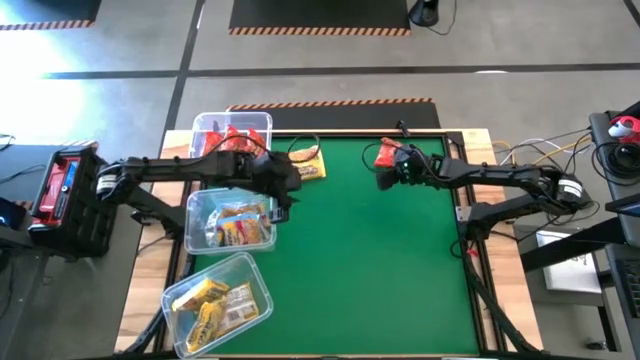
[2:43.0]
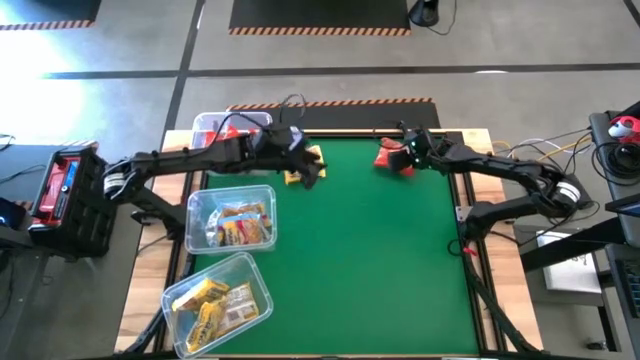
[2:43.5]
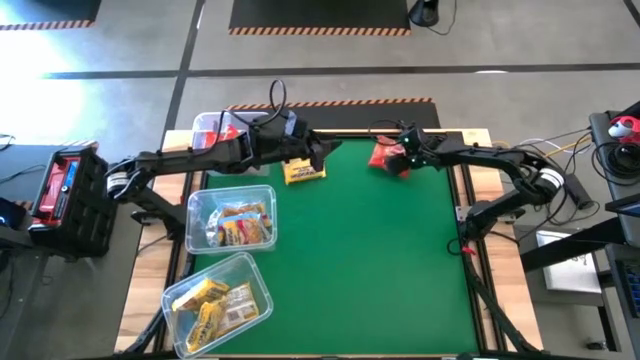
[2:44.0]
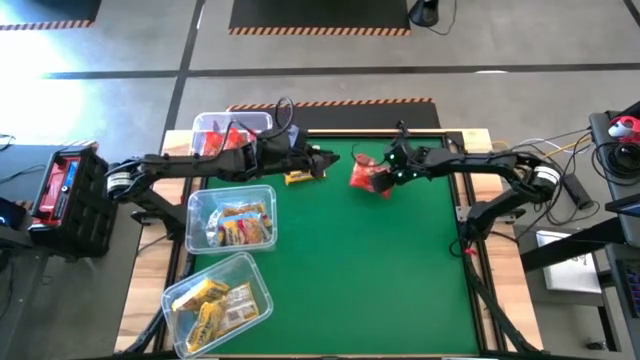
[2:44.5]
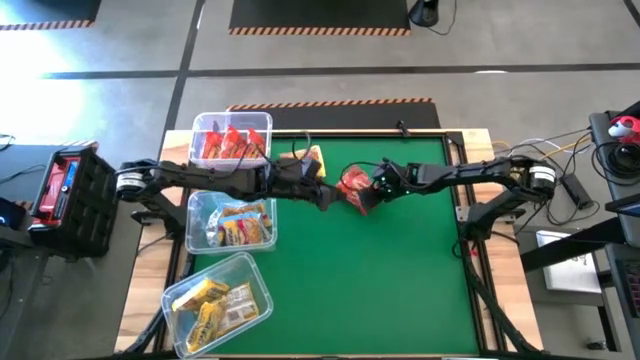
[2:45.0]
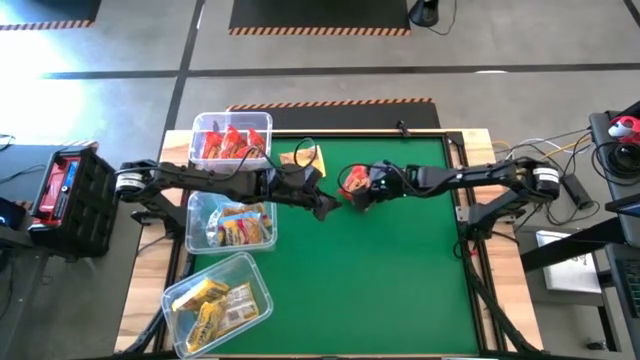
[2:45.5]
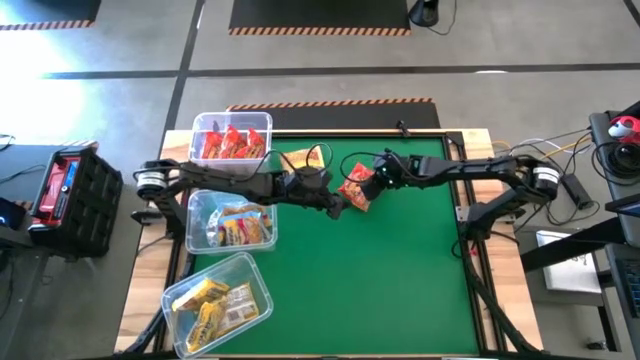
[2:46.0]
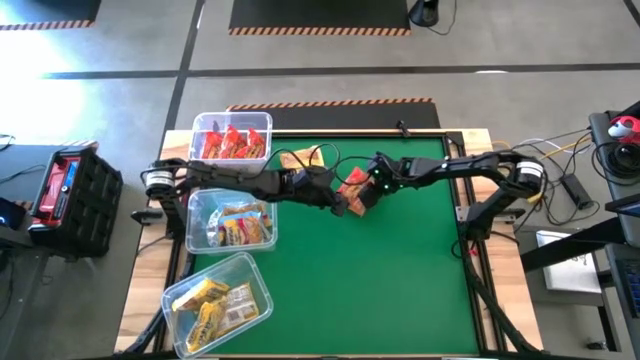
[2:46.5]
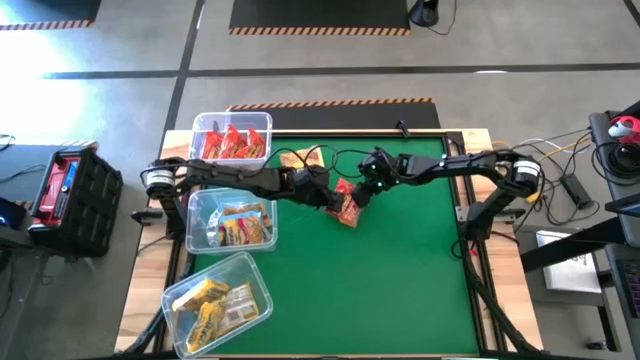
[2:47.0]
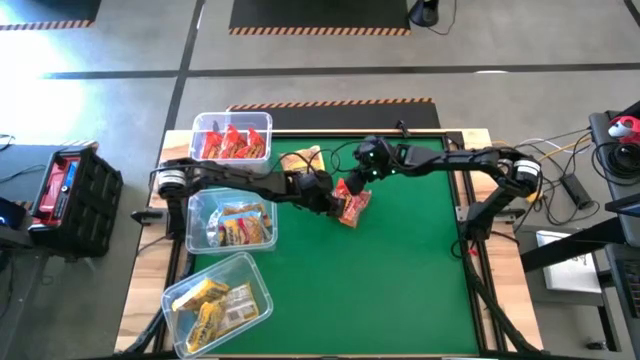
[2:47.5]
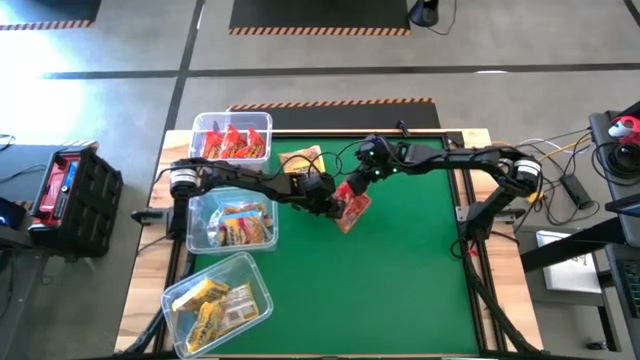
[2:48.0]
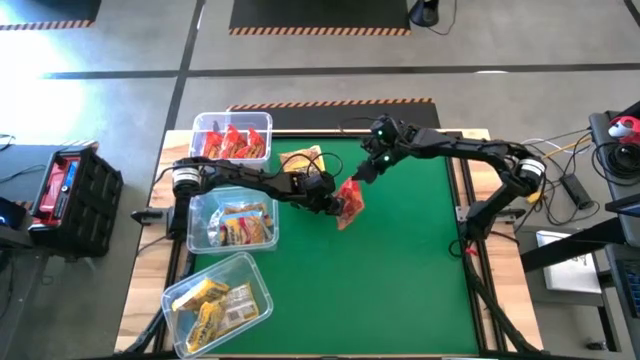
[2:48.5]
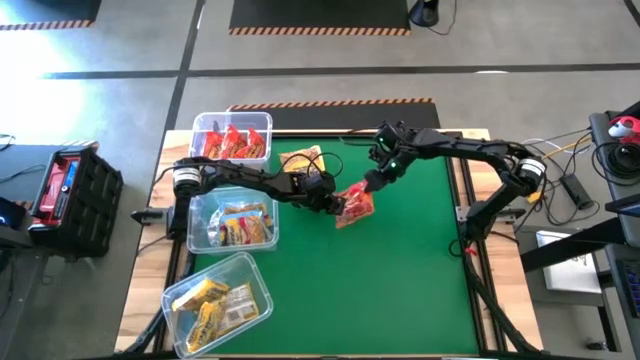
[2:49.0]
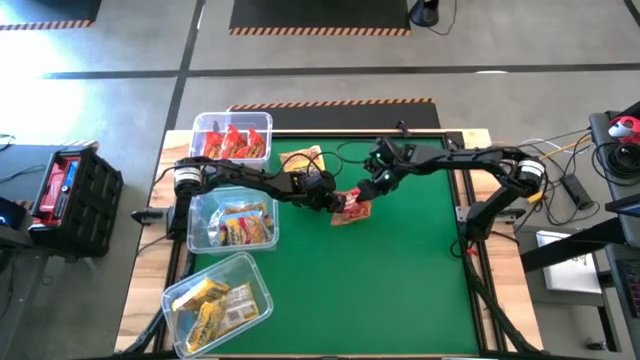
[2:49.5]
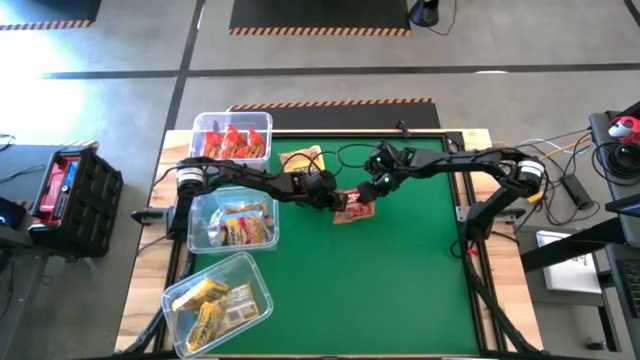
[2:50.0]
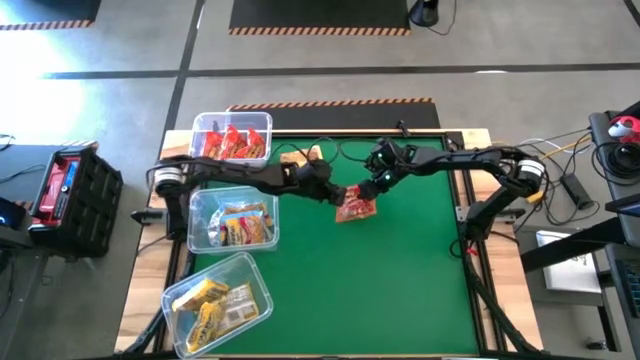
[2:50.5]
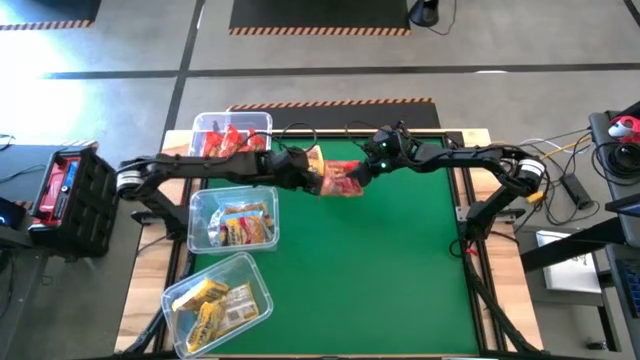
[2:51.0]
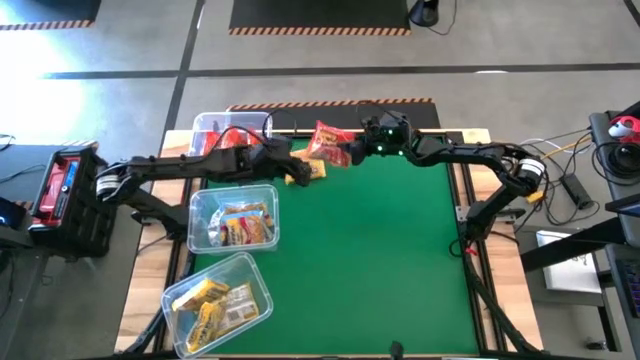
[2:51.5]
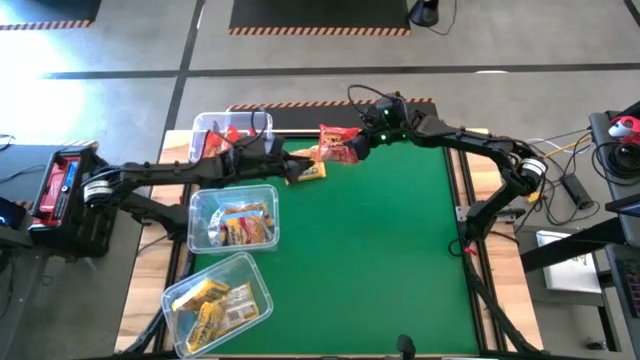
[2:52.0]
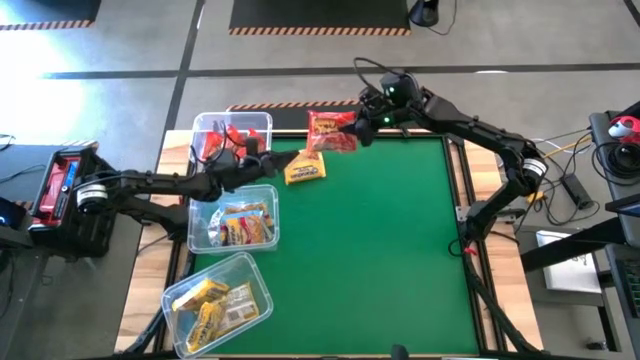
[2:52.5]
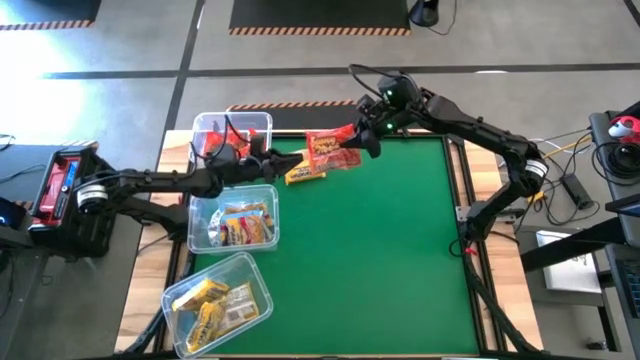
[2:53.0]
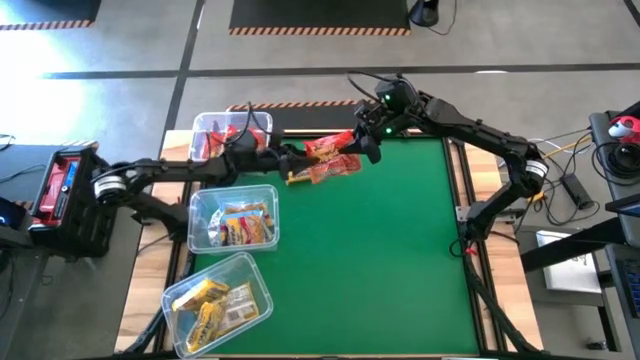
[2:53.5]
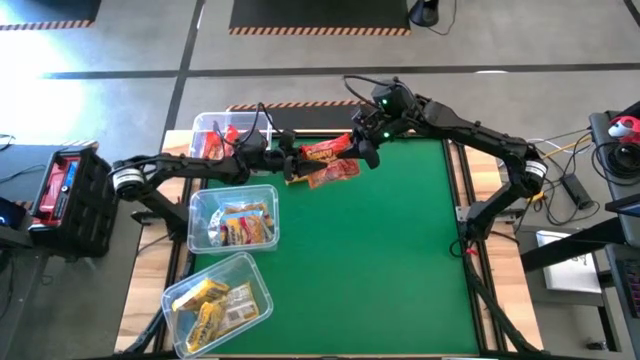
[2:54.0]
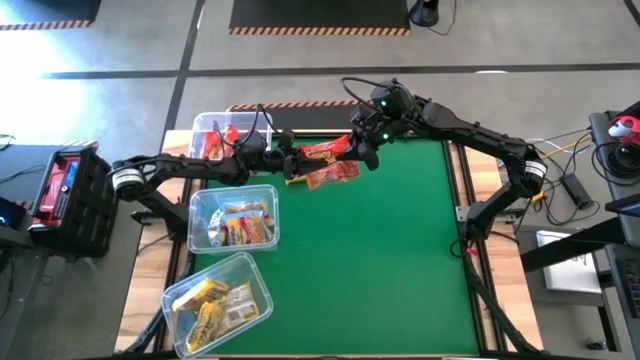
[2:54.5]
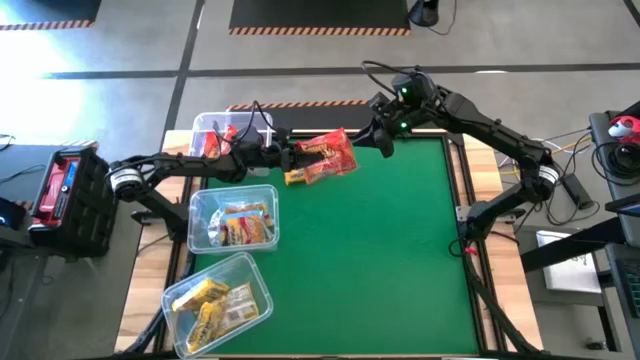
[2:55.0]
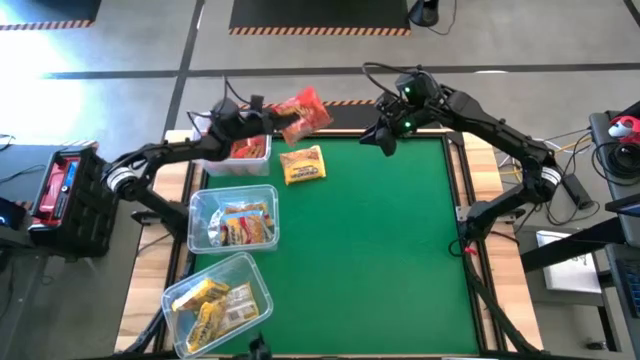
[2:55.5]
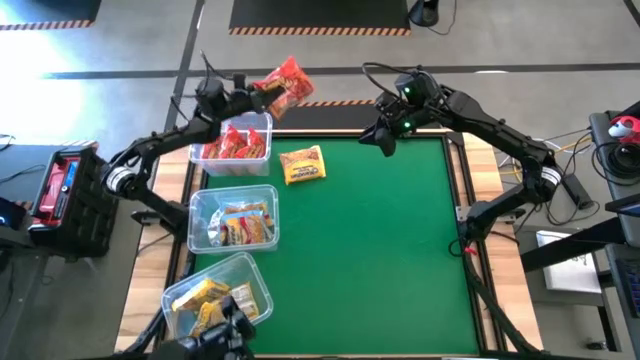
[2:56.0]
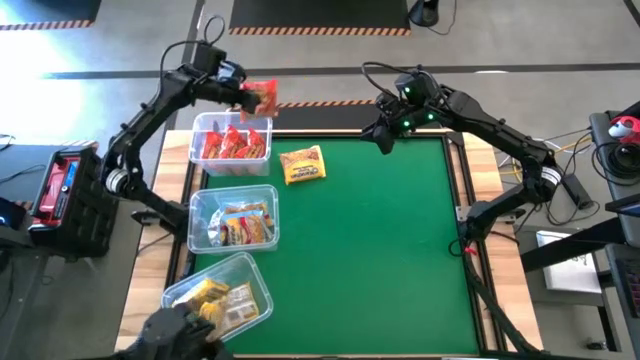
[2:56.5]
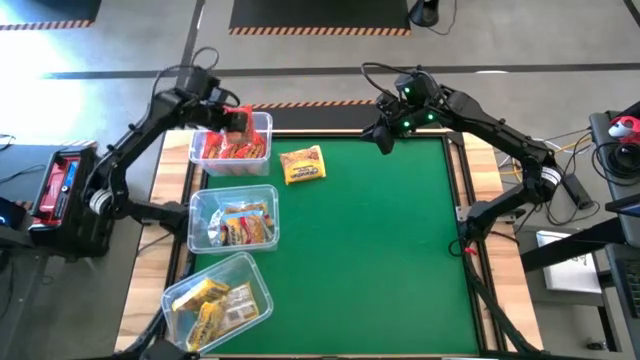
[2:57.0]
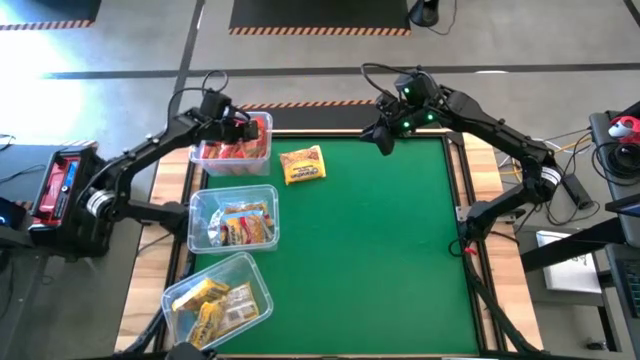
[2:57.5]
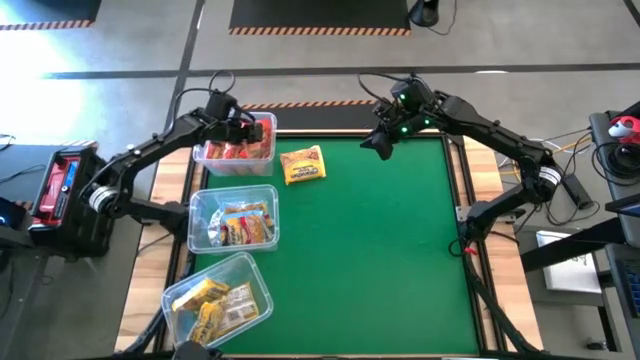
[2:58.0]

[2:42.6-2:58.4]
Task: Sort Maruchan noodles
Put the orange noodle pack into the top transparent bin

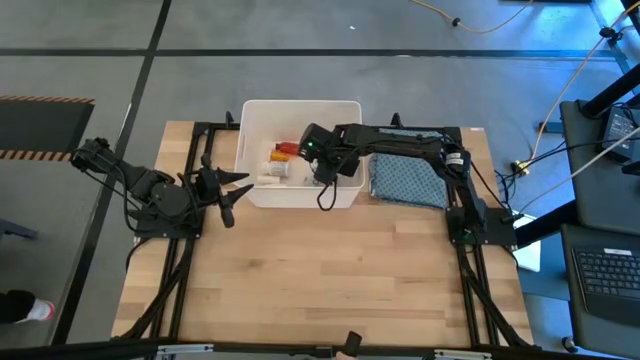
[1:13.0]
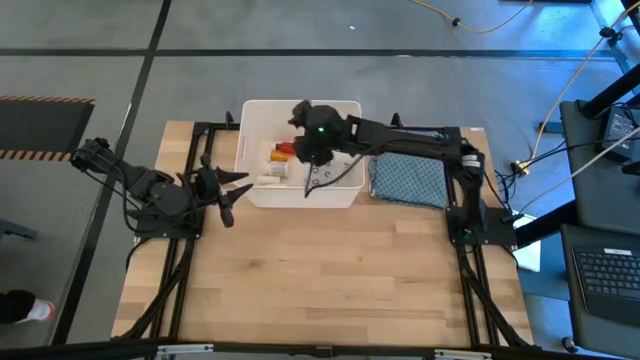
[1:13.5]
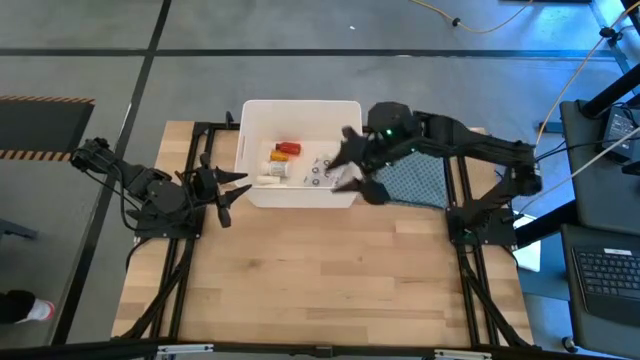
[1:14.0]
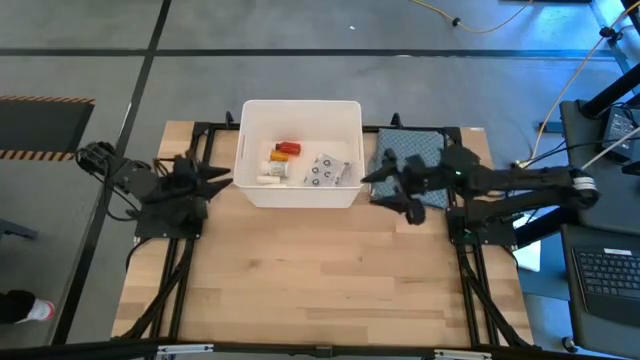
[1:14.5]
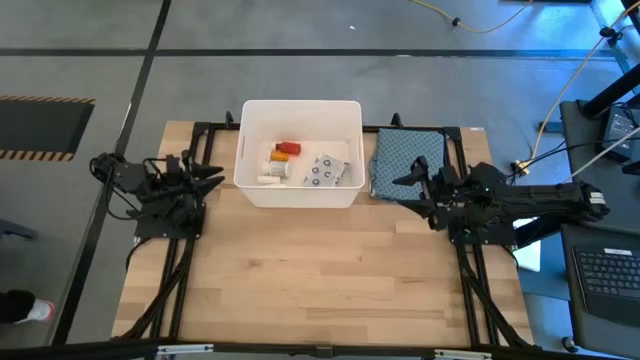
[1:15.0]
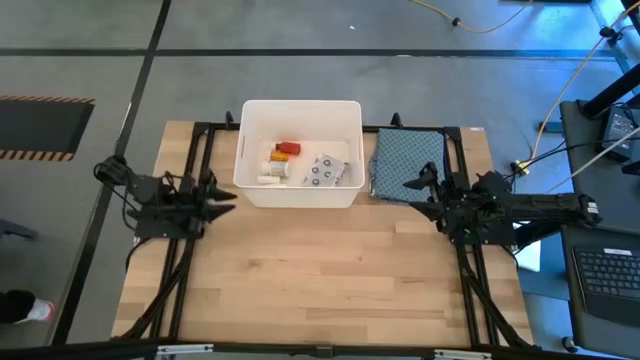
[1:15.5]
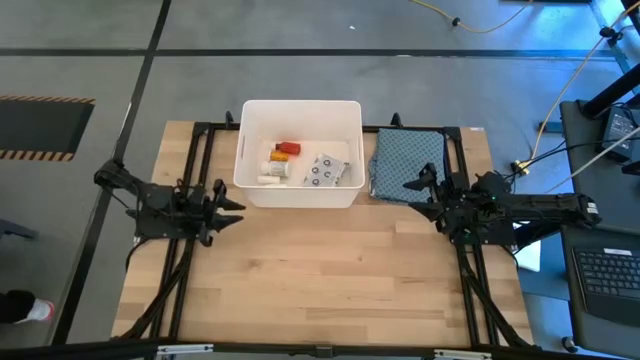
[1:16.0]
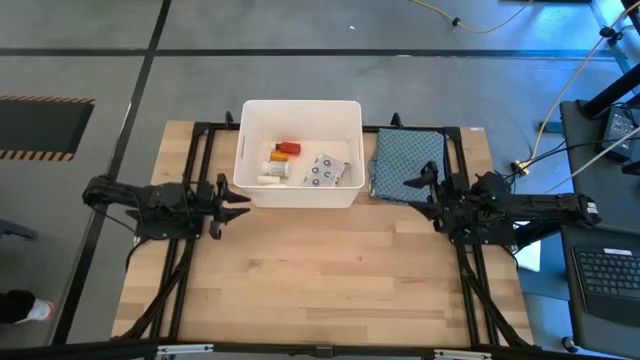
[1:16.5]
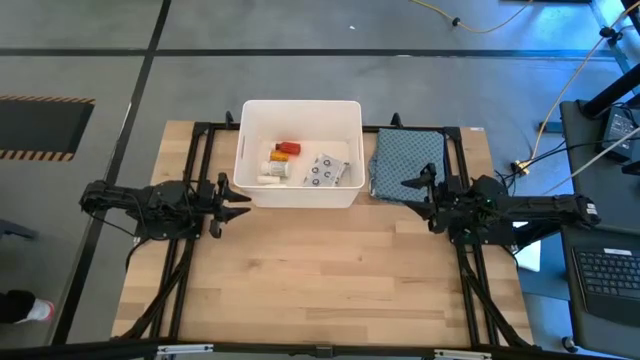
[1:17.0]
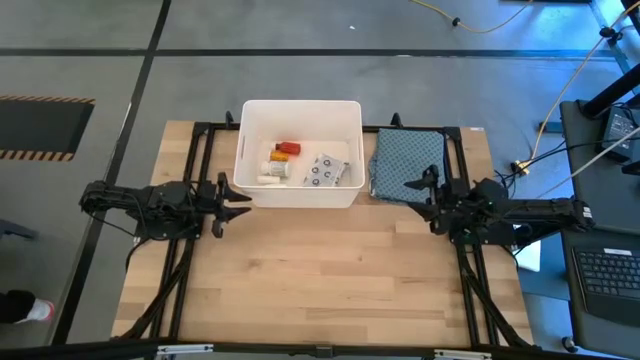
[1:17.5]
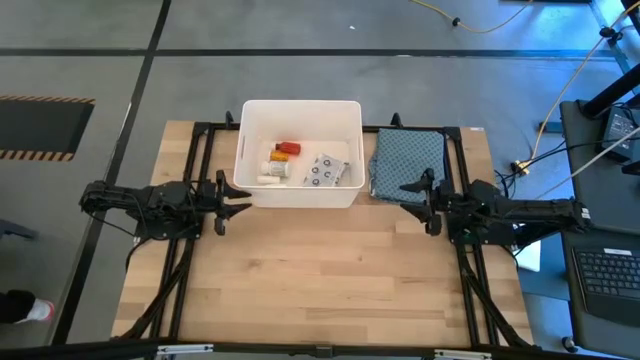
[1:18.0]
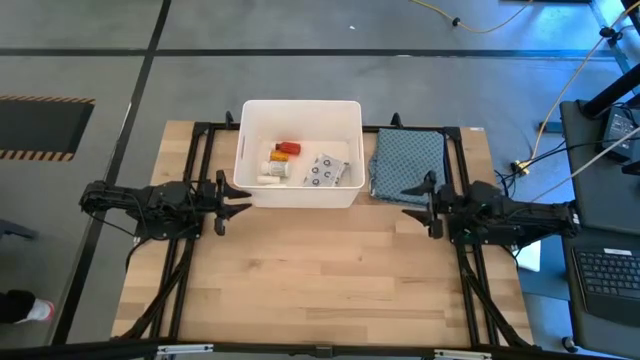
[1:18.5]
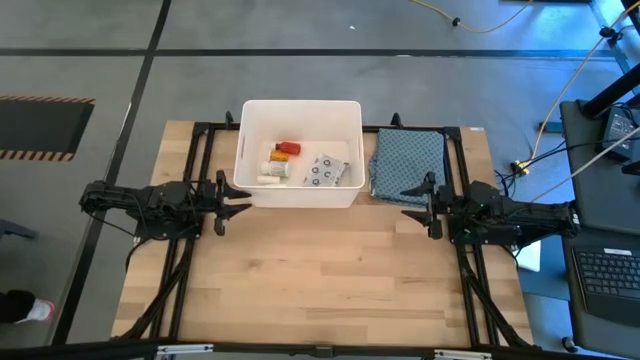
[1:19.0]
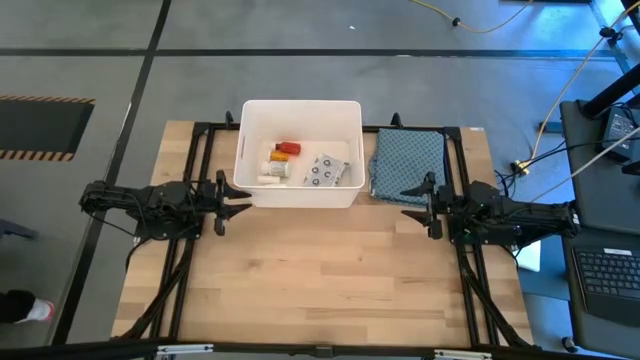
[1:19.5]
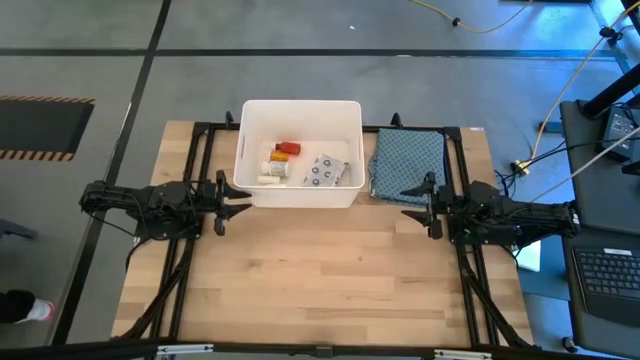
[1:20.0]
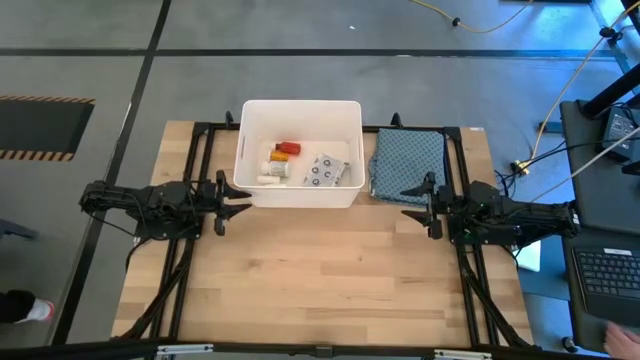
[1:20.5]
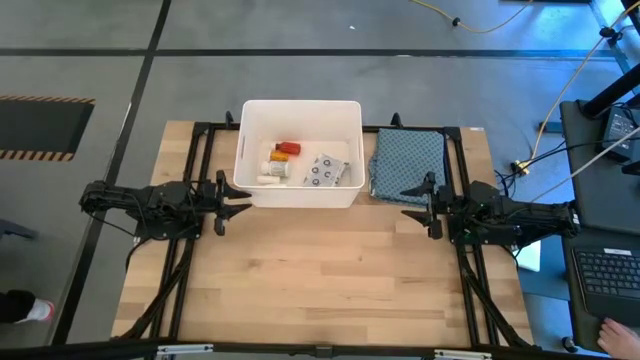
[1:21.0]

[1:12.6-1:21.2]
Task: Pick & place medical supplies in basket/bin
Return to Home Position
